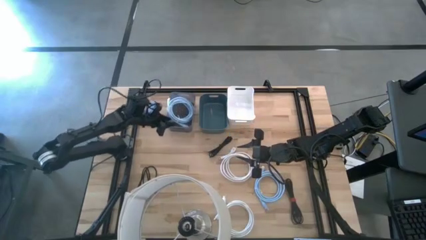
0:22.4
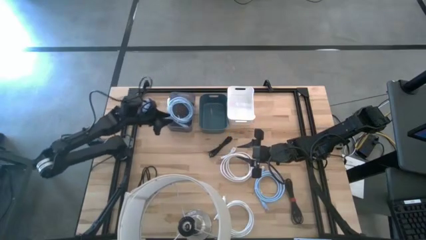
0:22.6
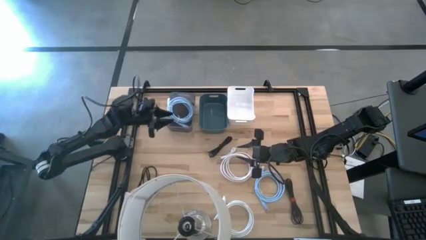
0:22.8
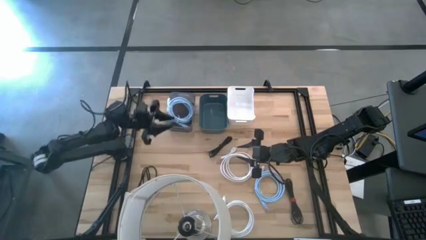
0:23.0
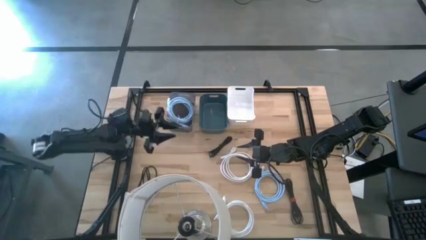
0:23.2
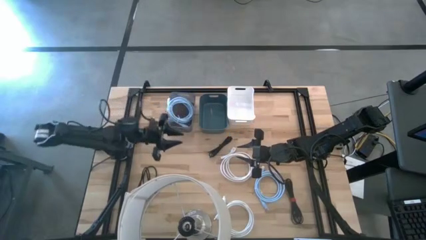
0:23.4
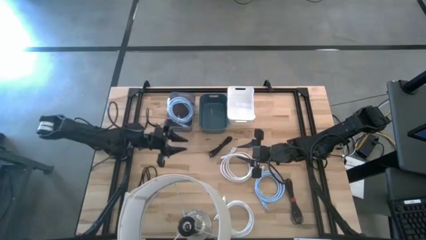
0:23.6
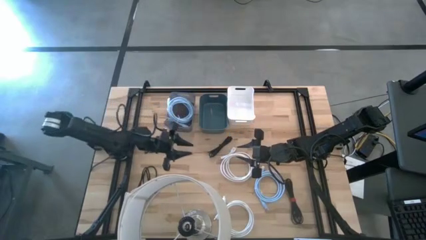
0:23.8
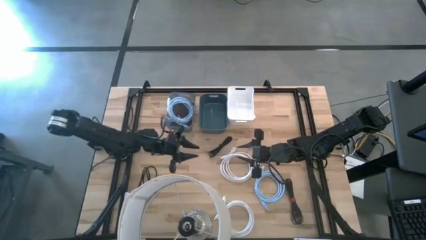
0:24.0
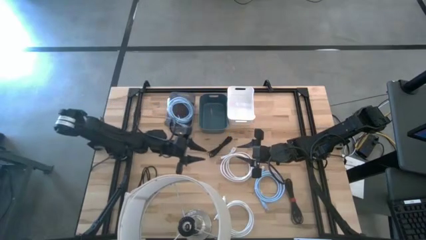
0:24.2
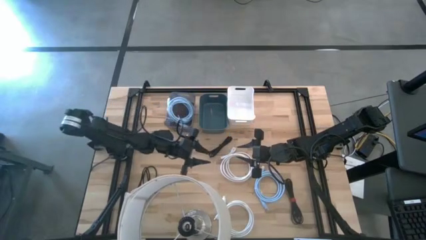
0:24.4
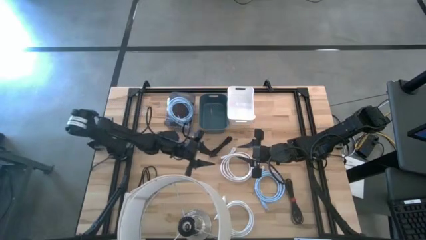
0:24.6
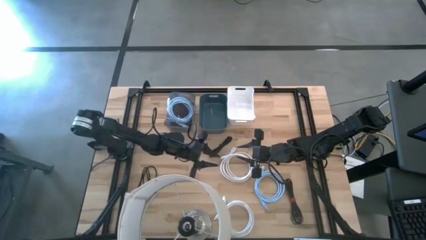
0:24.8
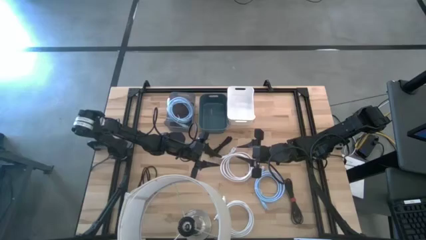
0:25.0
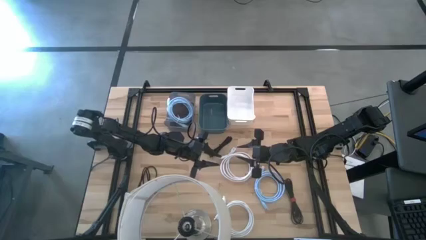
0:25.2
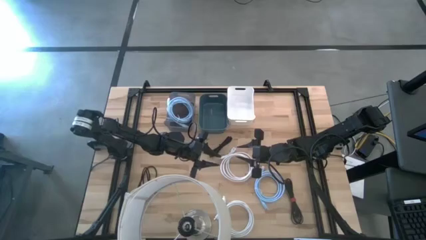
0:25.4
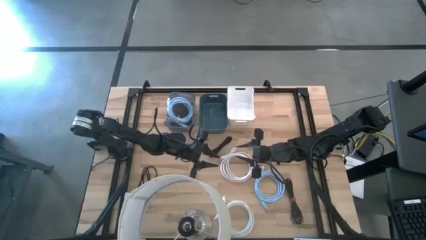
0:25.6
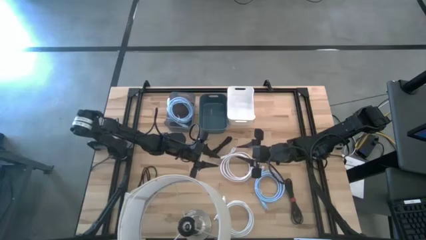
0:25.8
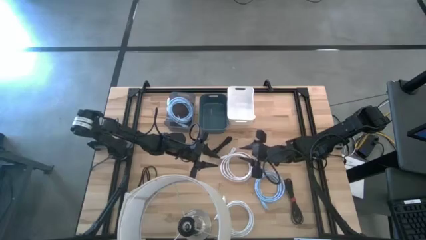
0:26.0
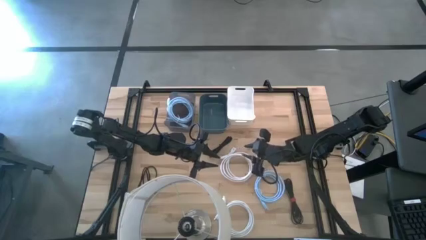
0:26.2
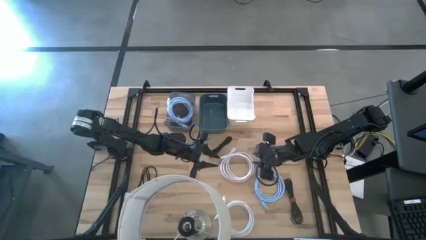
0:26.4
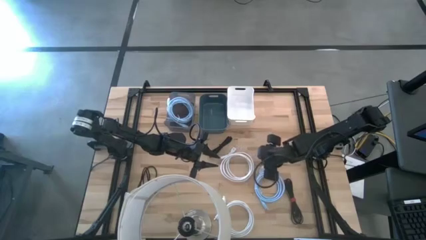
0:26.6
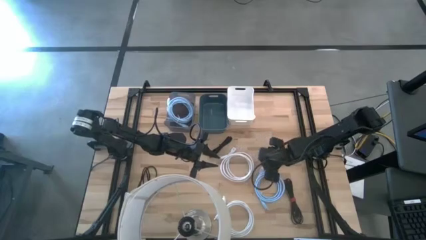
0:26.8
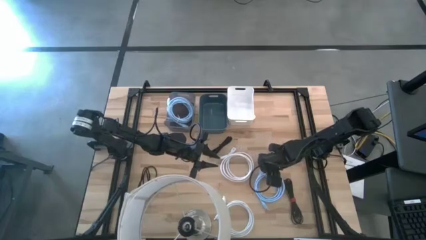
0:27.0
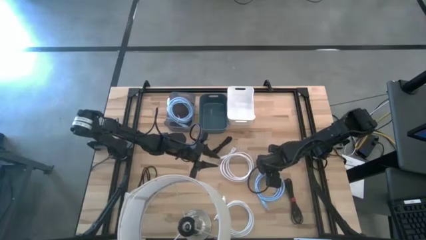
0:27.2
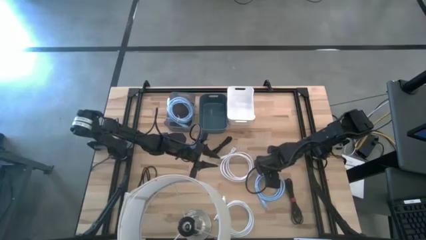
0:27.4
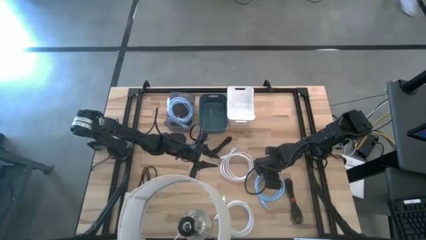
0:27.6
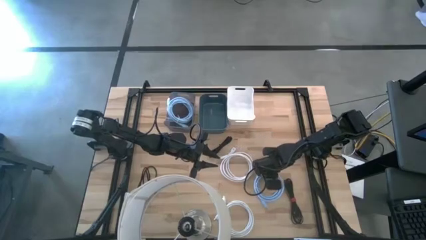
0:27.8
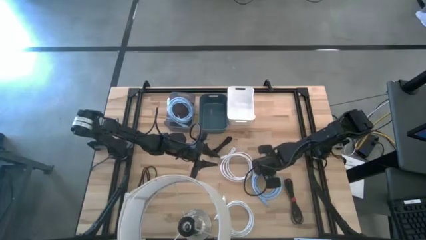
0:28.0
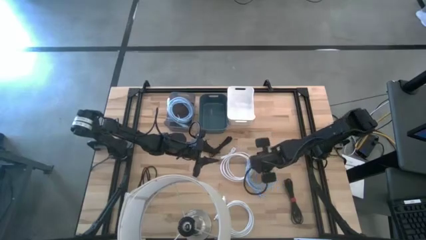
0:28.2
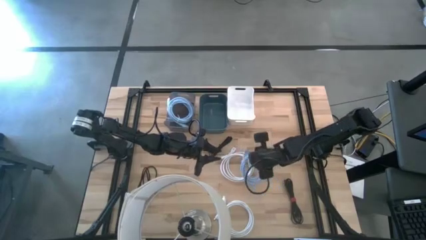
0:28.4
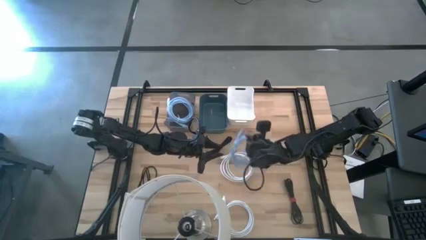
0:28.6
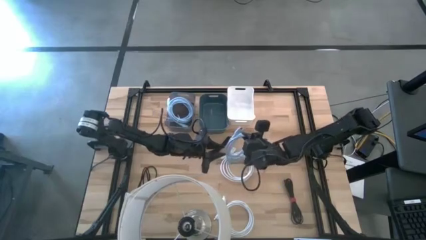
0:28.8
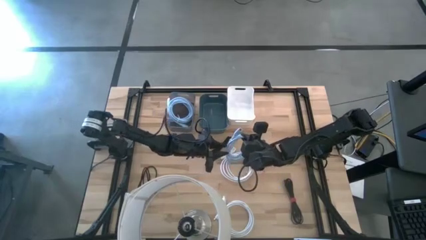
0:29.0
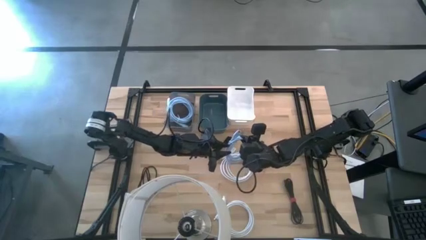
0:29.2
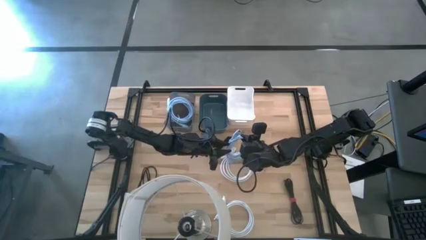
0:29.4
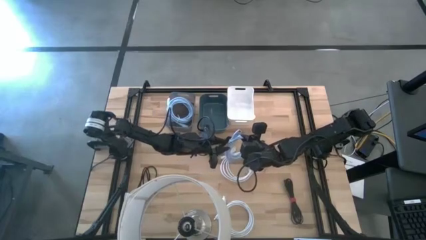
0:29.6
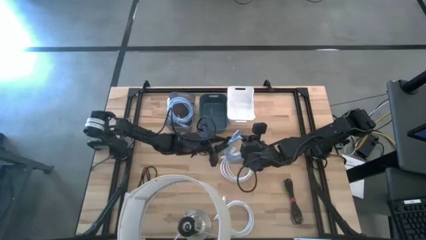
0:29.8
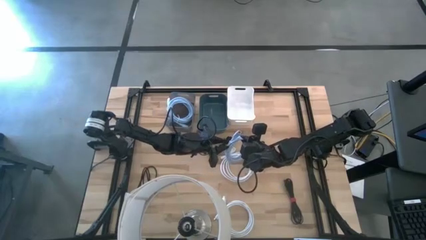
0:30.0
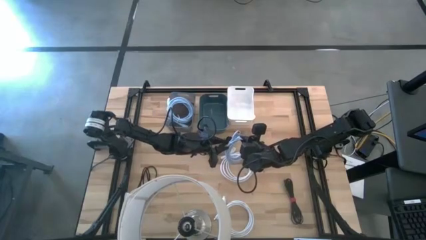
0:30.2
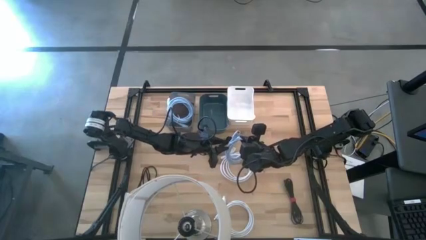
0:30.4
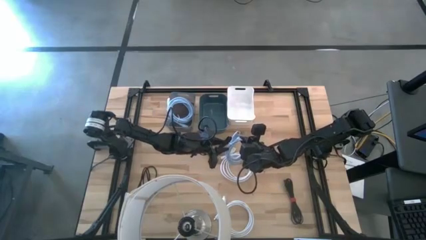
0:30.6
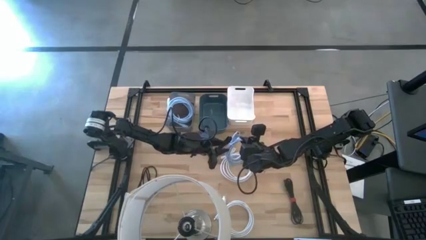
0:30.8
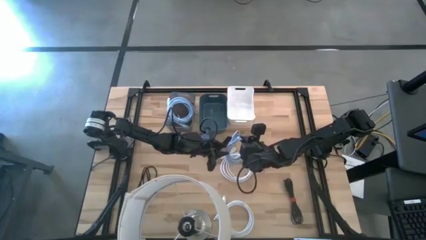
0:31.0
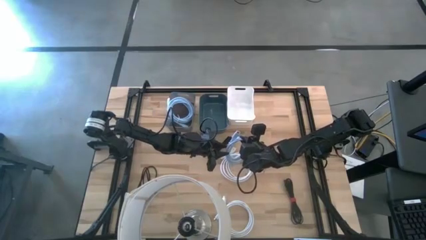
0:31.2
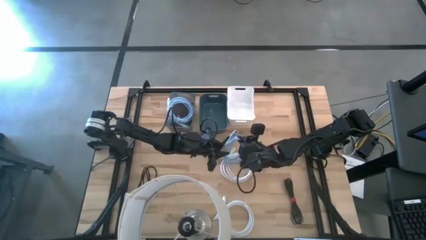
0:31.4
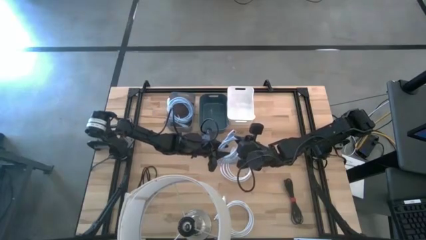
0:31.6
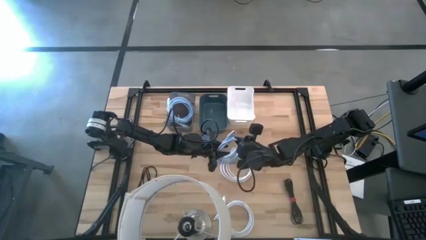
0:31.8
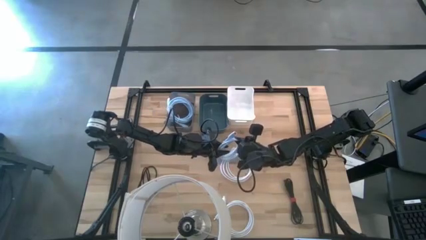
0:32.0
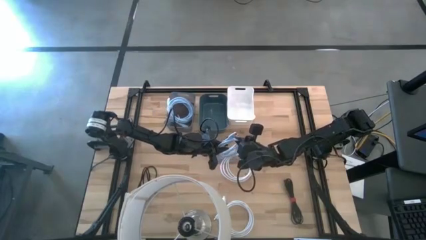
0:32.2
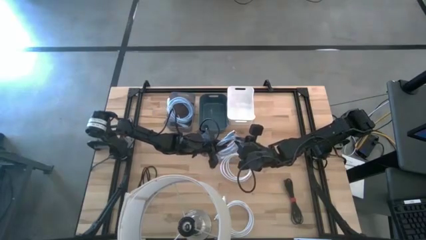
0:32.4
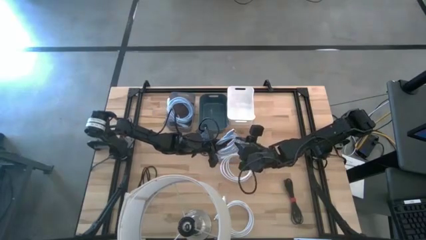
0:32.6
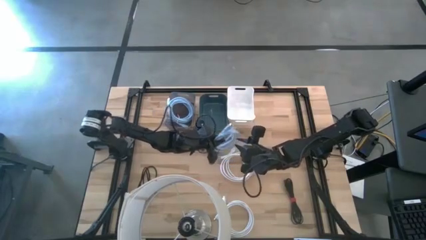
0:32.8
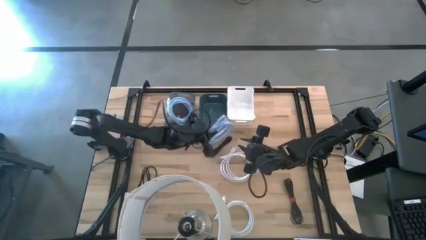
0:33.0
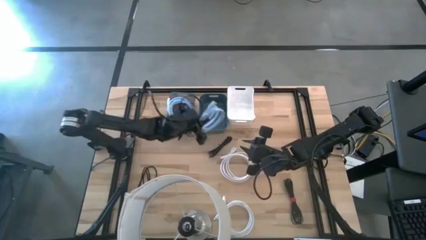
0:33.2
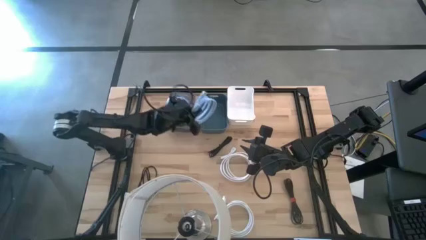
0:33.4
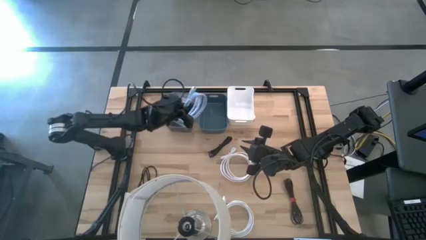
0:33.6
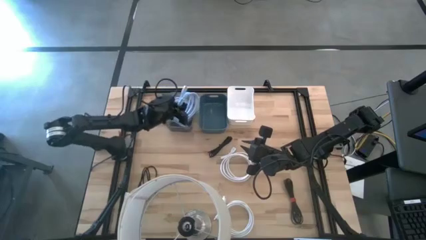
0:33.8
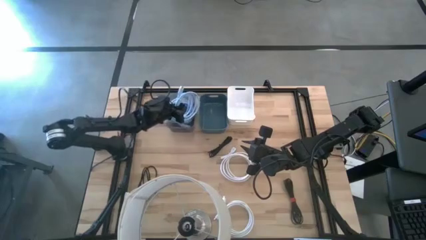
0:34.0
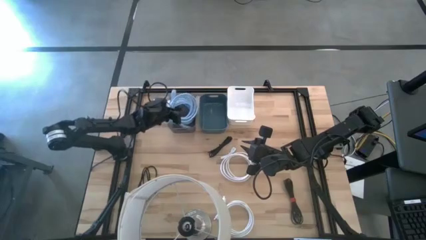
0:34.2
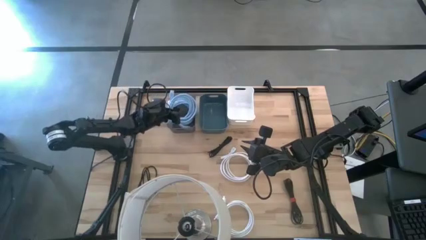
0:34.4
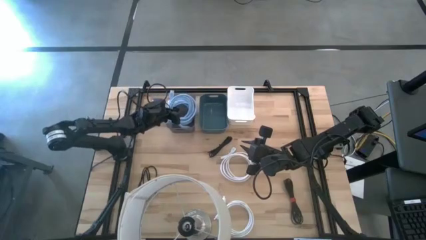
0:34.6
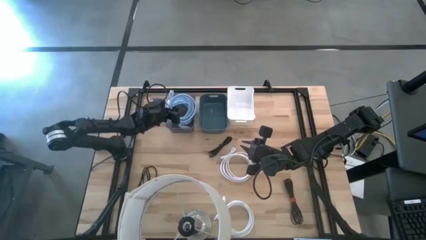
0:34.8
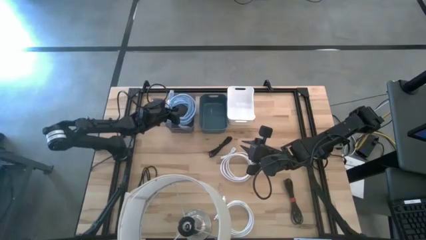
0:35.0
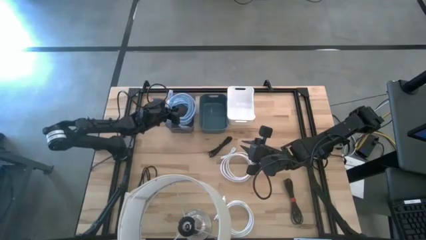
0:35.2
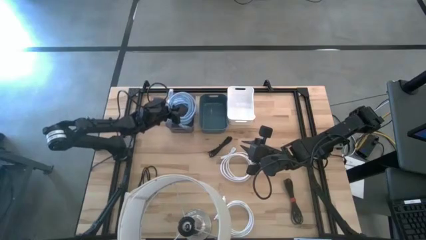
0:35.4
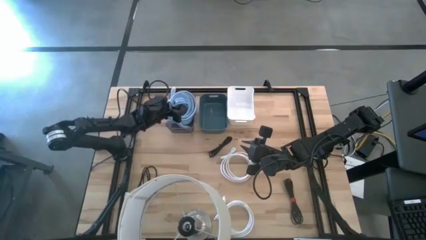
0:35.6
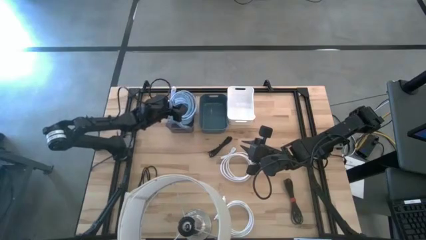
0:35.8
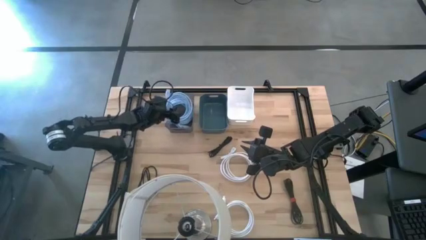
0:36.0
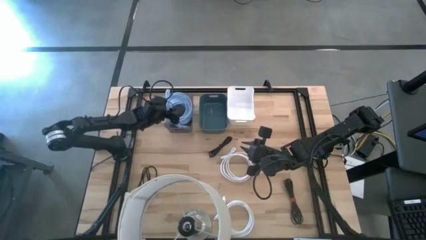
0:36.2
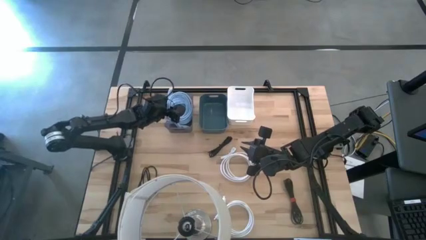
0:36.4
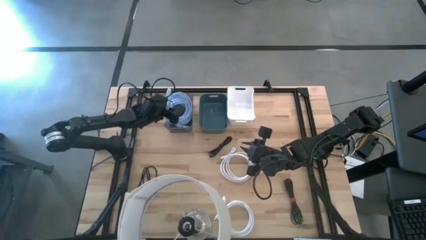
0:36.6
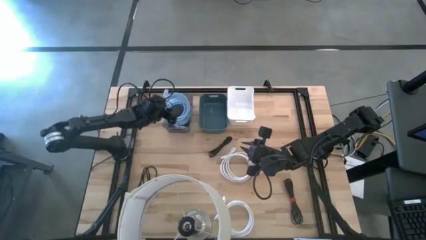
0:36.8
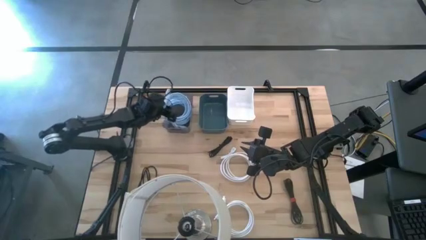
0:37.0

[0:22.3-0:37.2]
Task: Sort HDMI cables
Put the blue HDMI cable into the black bin

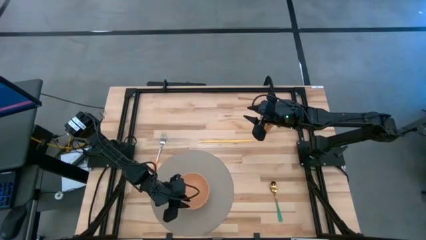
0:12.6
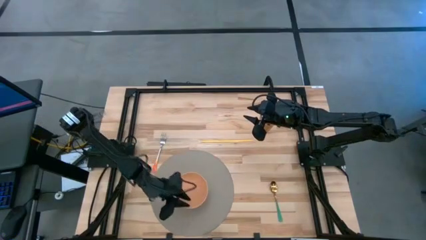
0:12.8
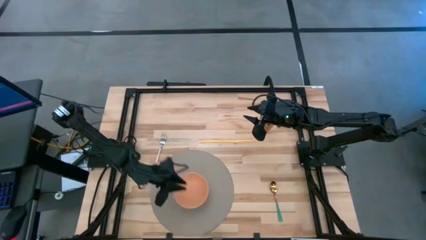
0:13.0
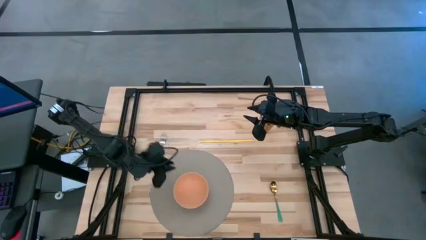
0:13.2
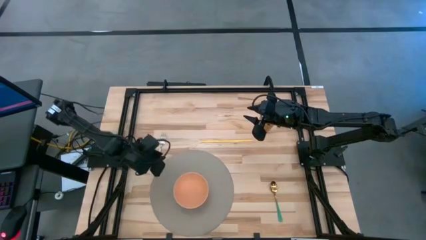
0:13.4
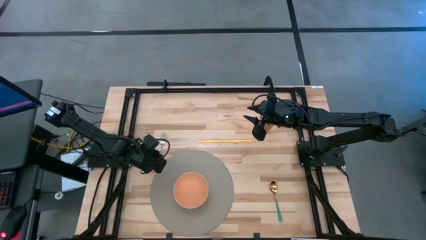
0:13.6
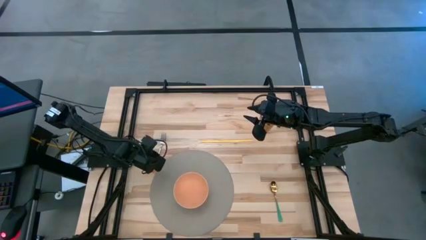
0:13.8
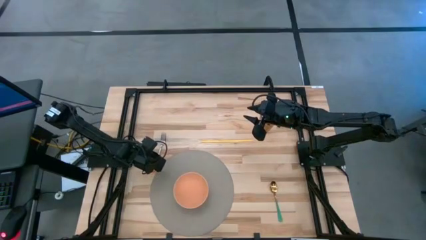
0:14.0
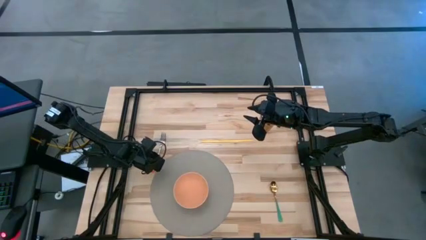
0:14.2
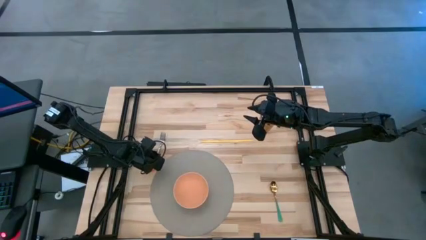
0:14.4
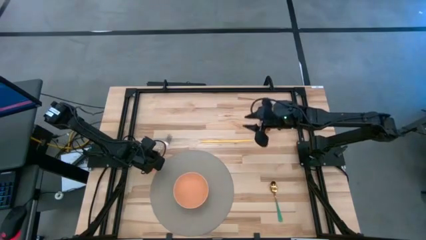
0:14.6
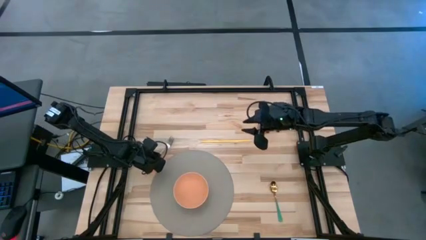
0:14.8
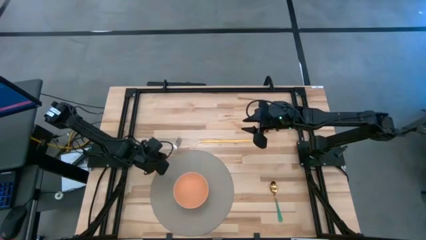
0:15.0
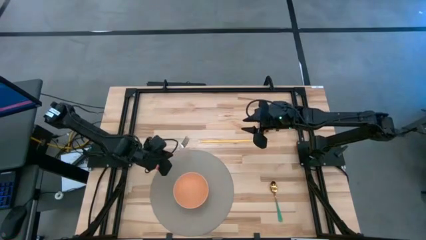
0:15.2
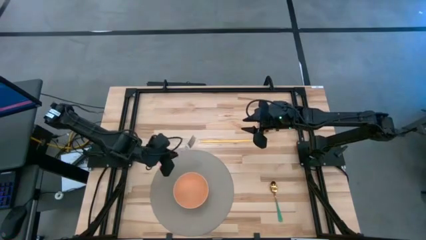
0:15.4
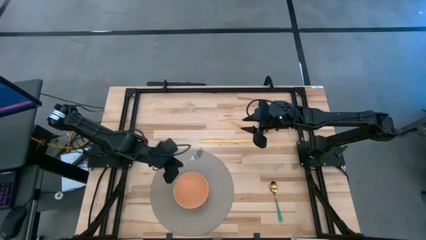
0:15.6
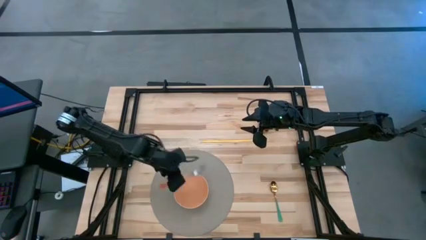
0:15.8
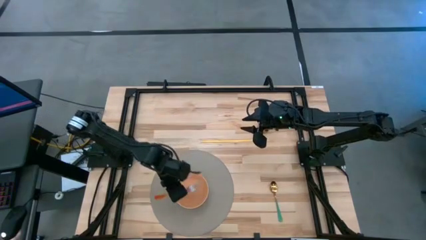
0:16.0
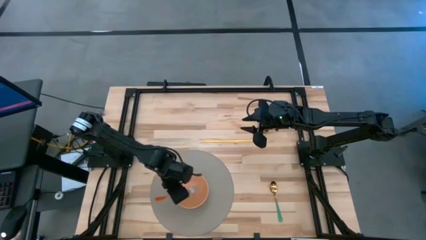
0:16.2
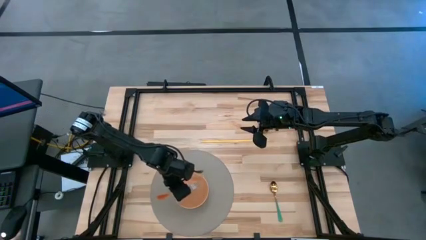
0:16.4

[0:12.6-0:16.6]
Task: Pick & Place Utensil
Put the orange fork into the orange bowl
